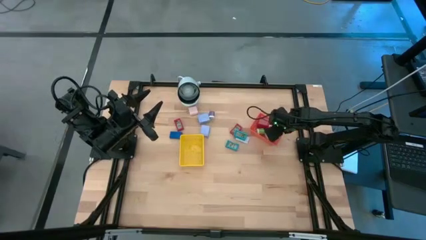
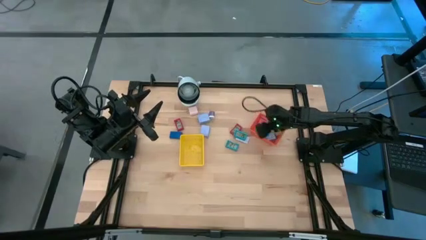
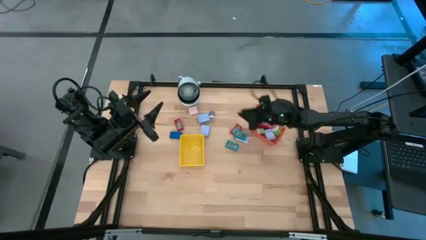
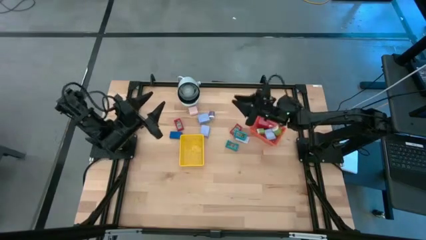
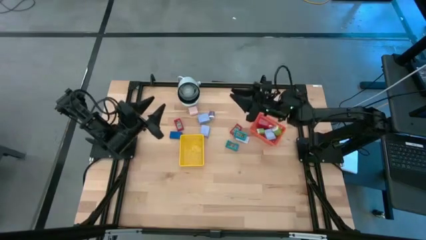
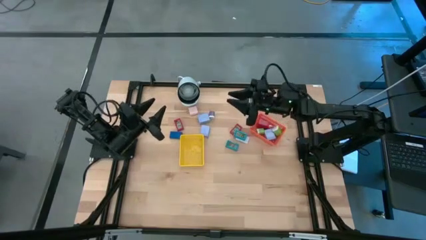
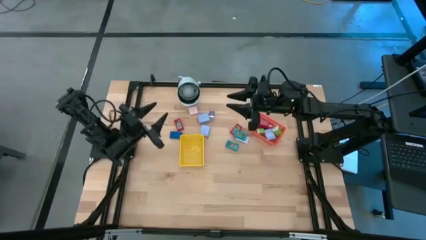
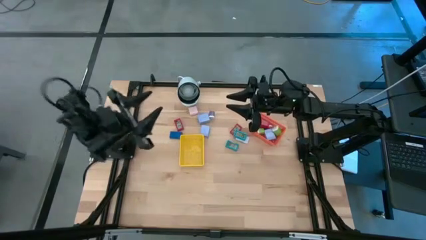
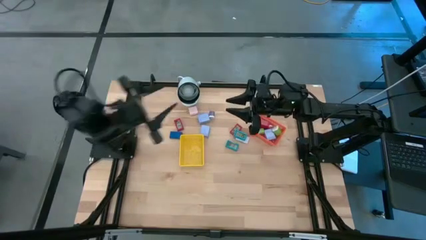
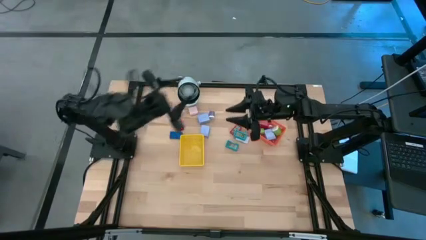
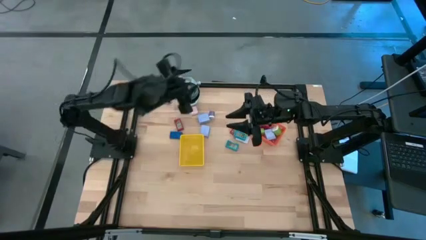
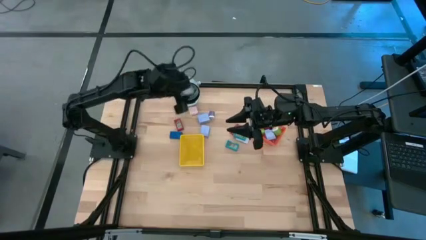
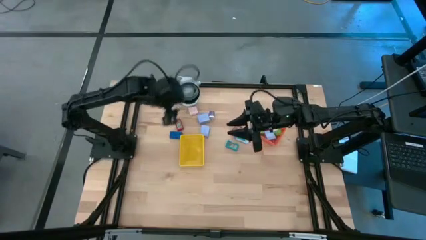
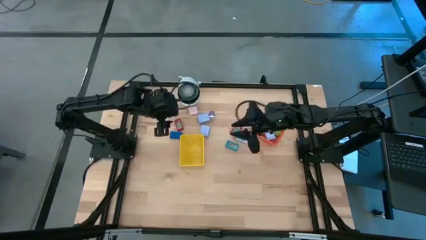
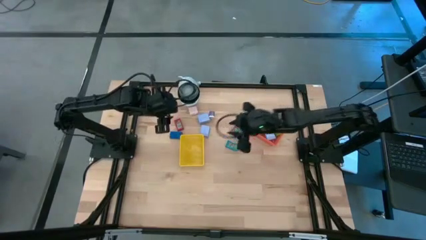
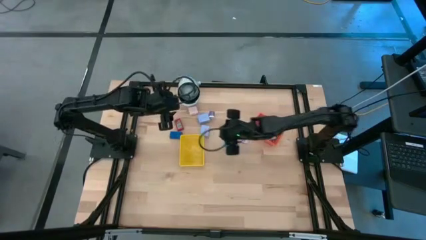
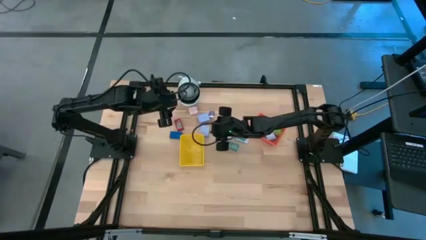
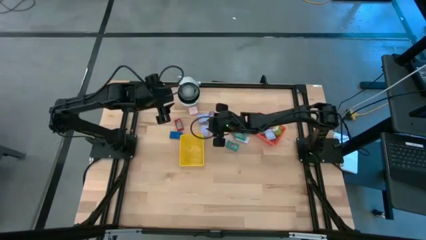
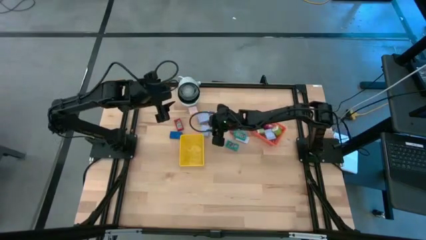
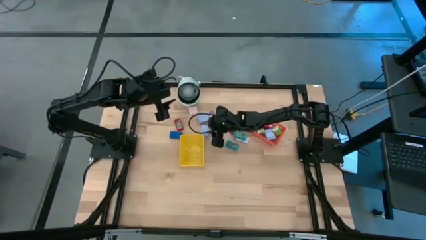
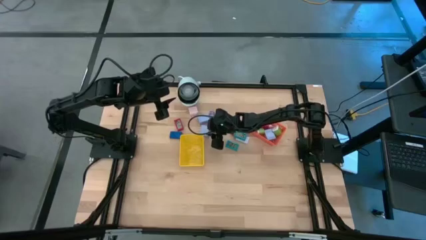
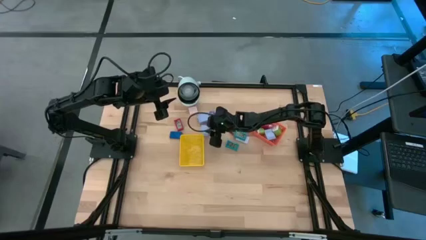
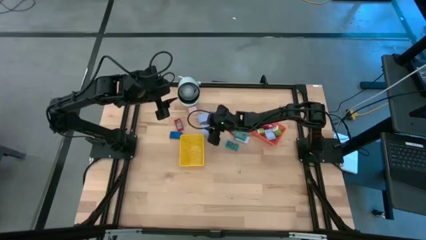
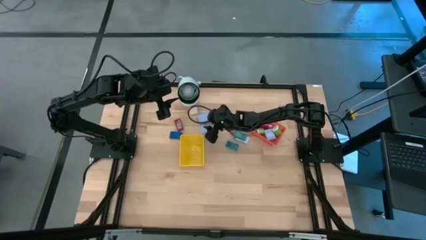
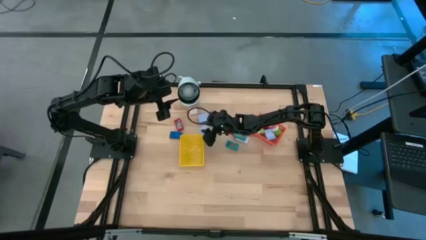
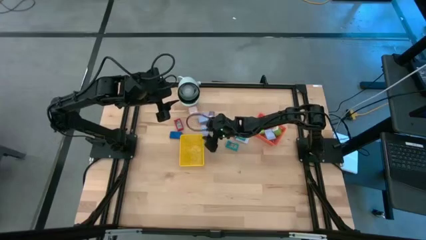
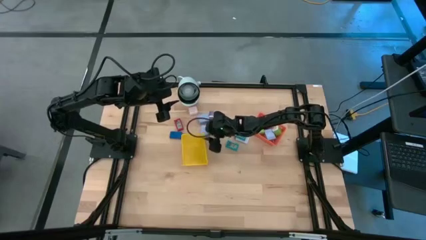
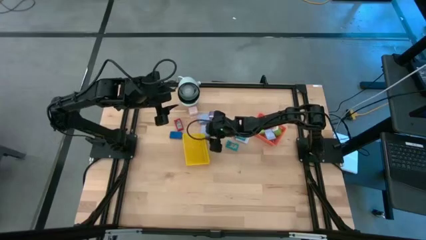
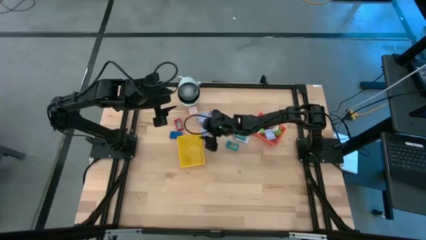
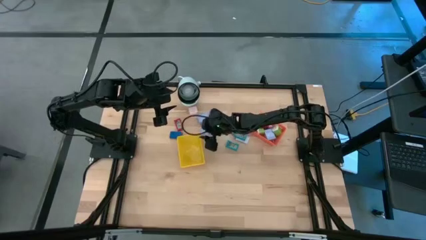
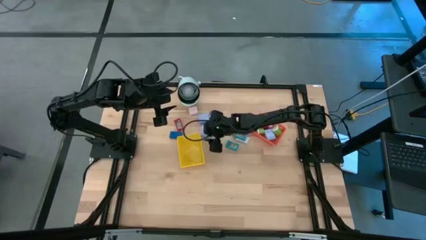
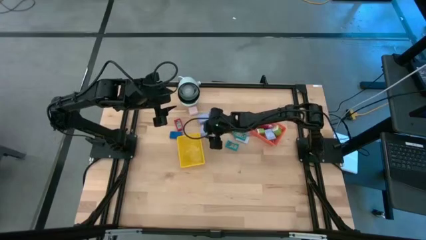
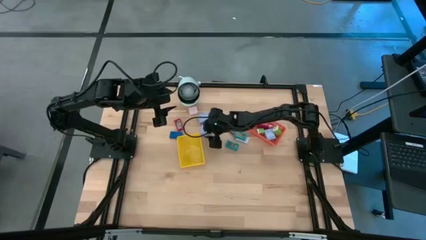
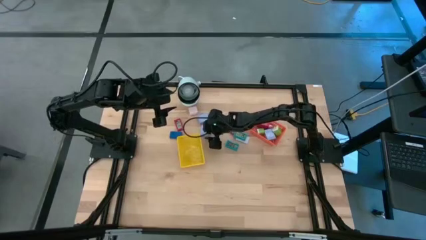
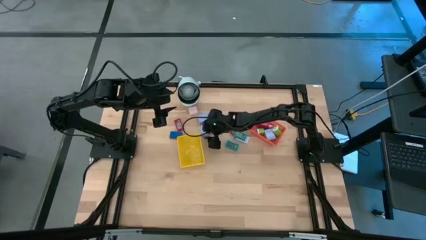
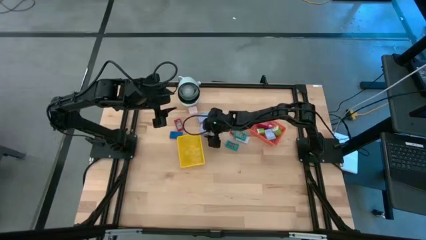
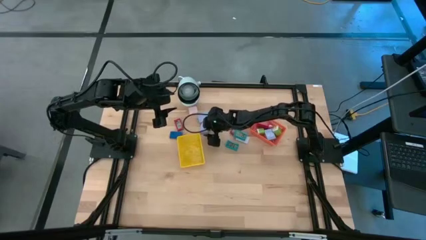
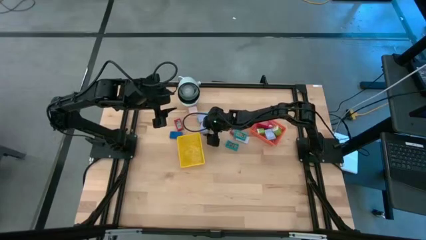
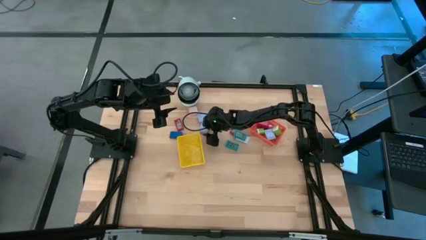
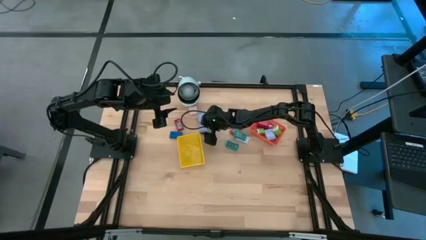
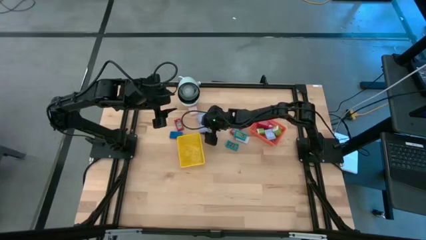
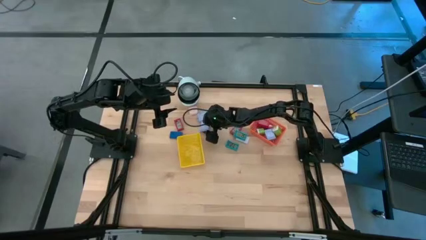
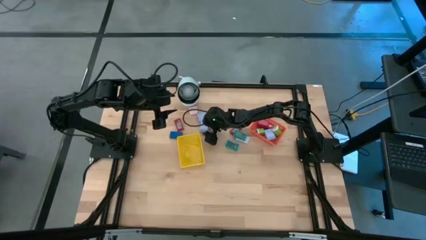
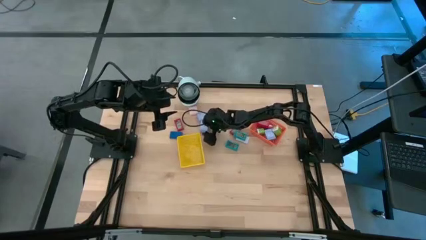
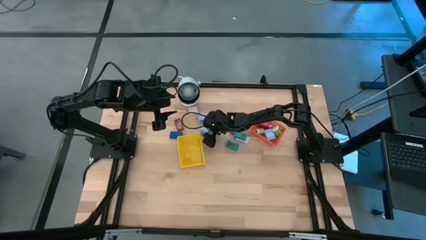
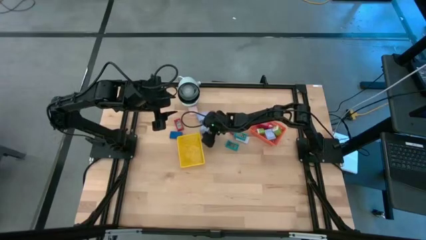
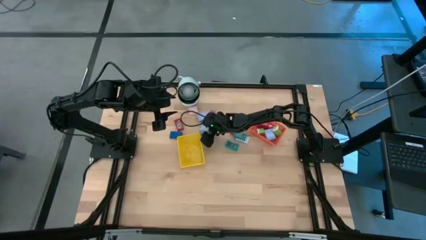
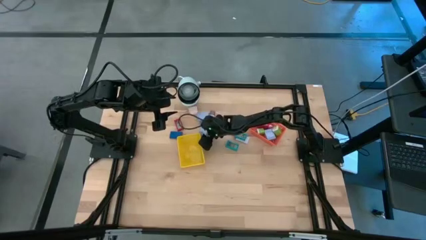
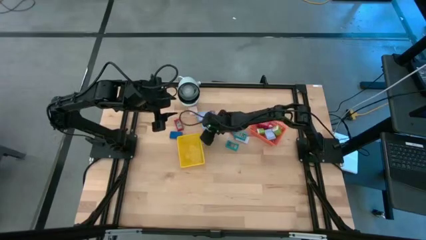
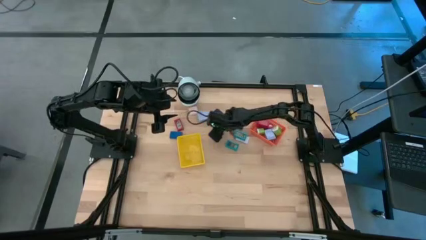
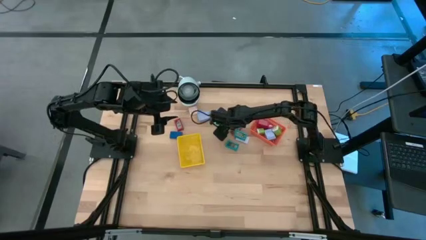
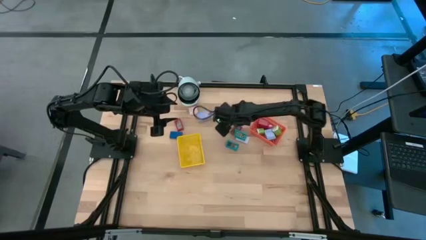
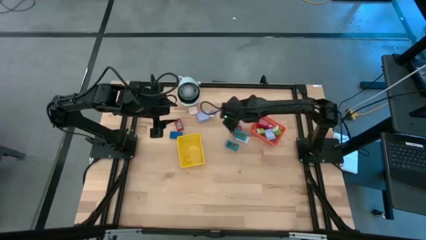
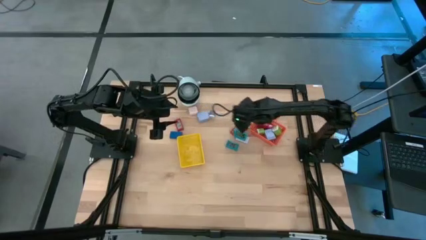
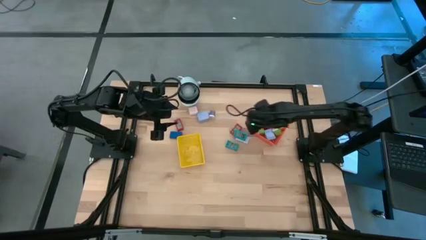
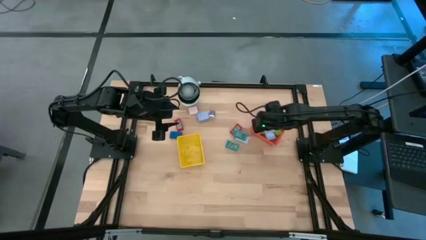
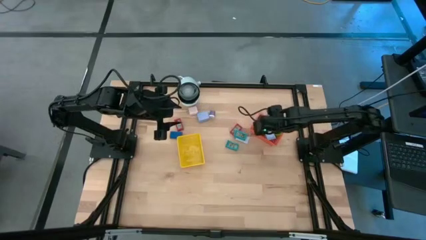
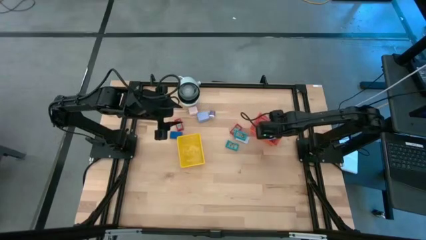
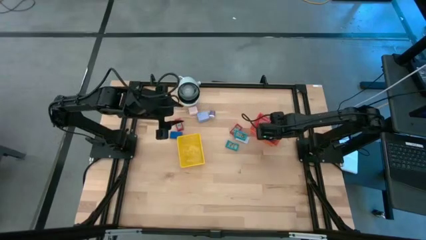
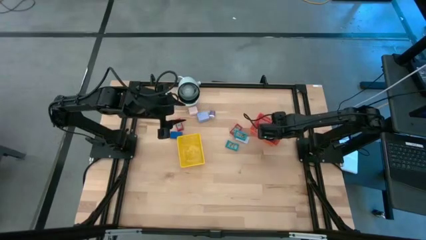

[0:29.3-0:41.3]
Task: Pick & Place Office items
Put the bottom blue charger adapter into the orange basket

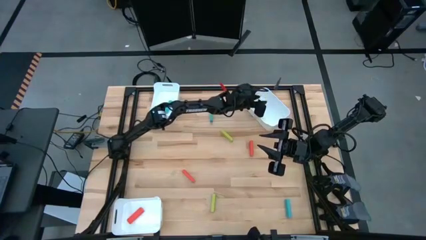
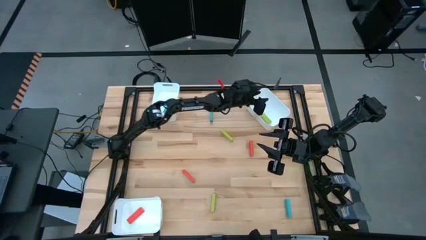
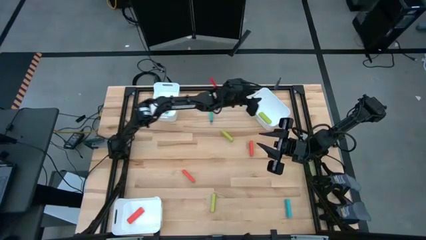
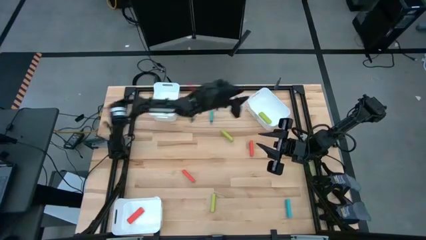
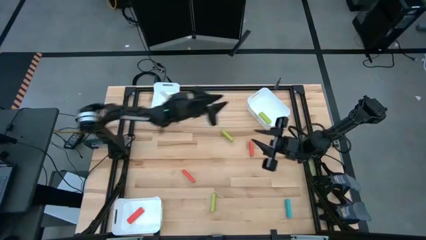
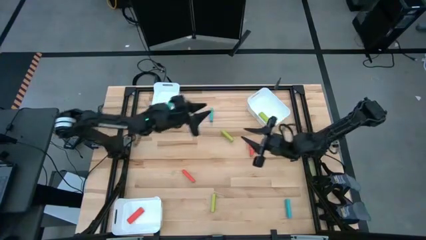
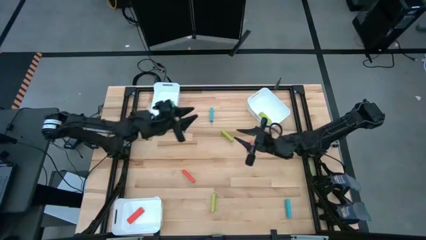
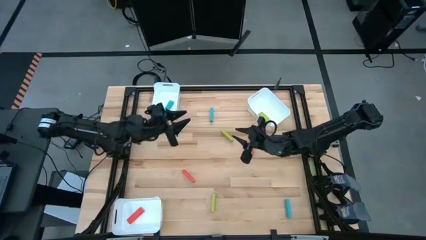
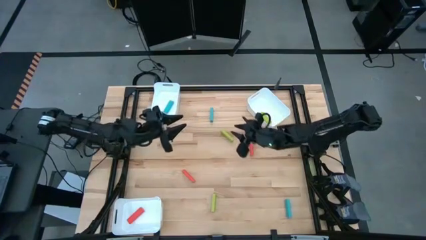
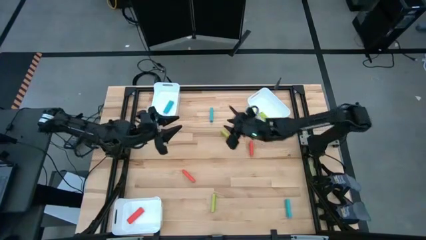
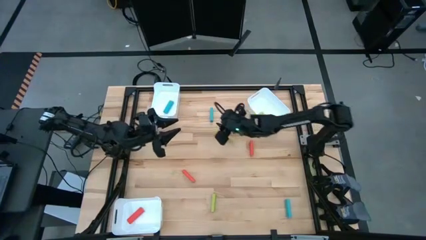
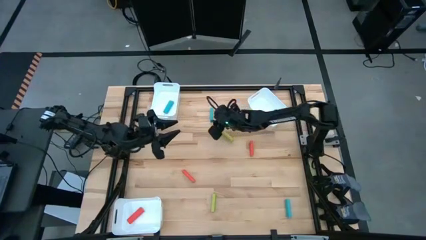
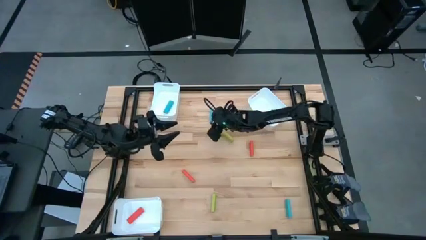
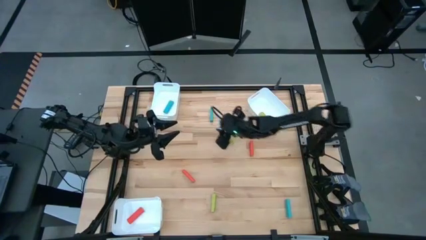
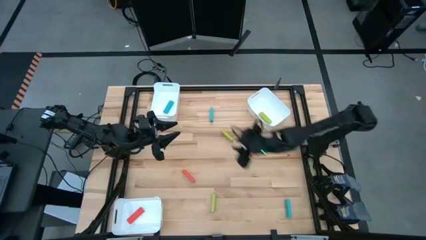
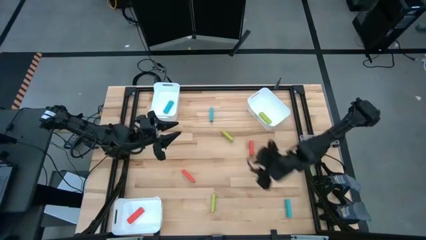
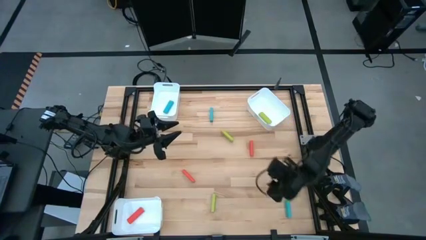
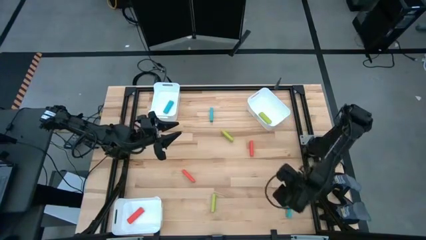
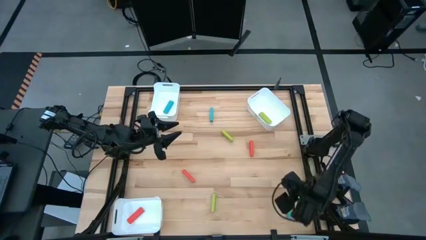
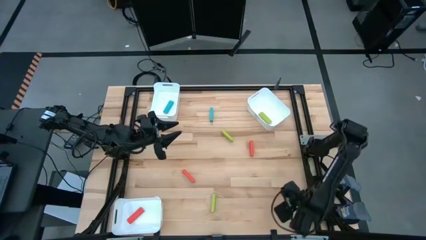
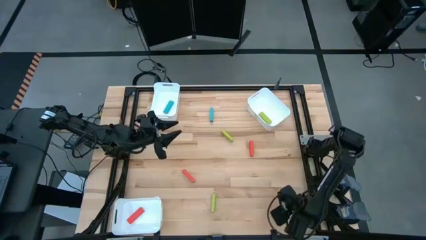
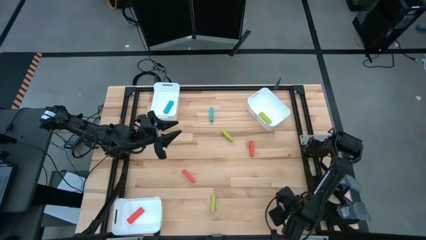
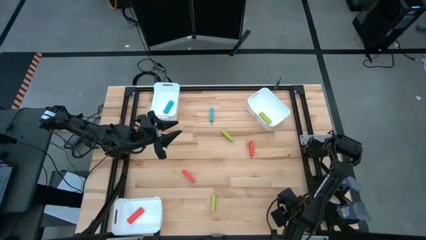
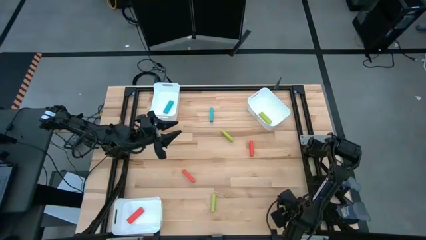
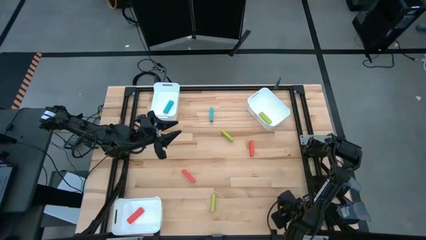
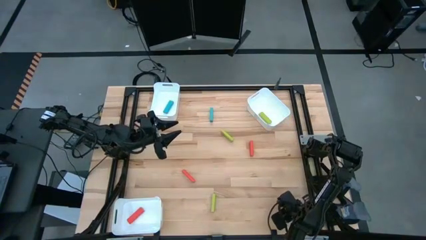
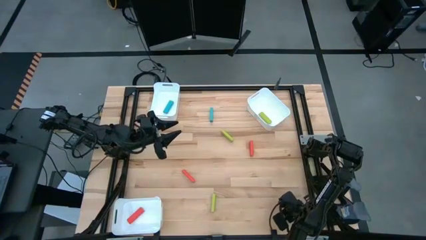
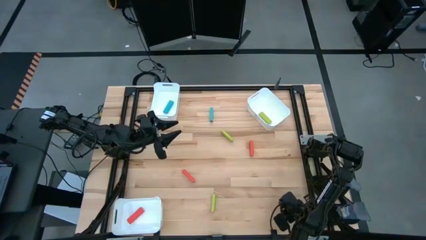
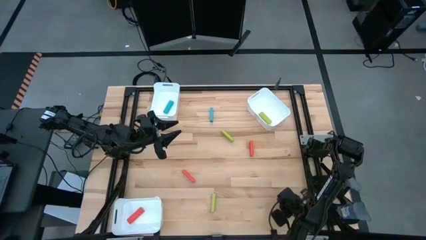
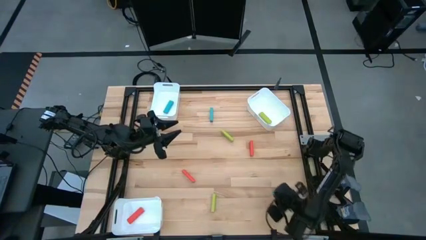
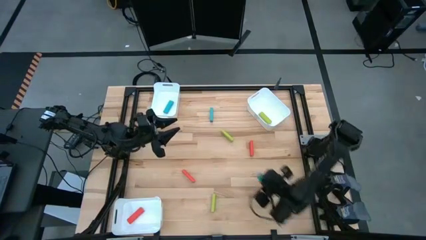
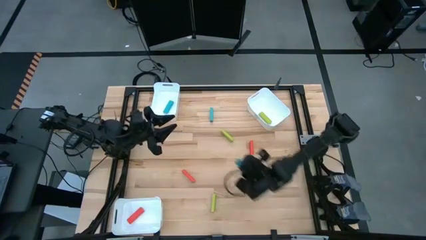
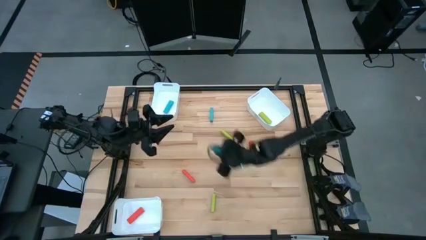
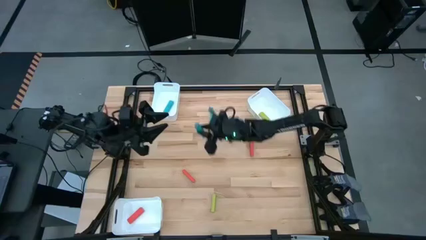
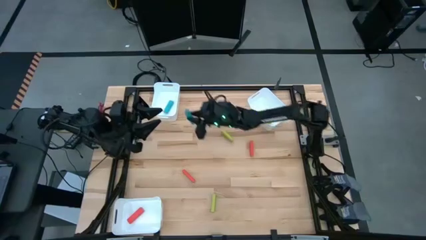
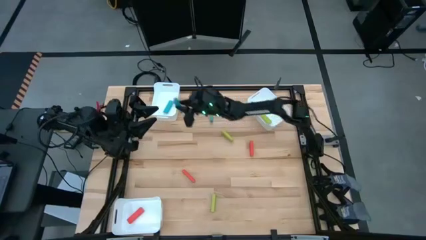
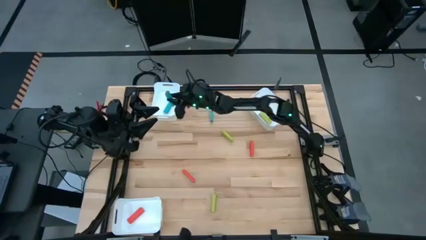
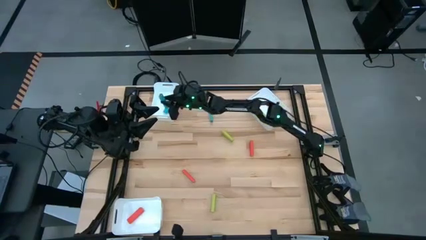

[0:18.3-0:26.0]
Task: Sort blocks
Put the bottom blue block into the top left white bin
